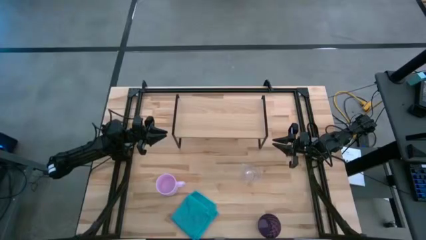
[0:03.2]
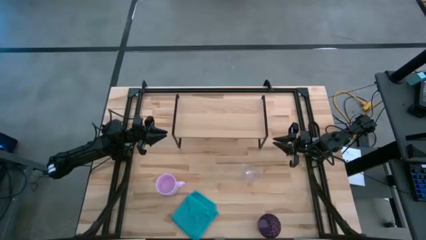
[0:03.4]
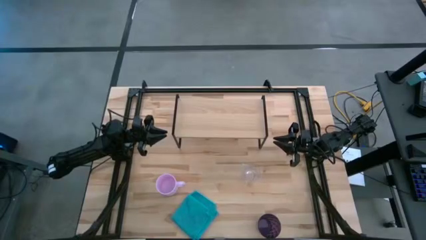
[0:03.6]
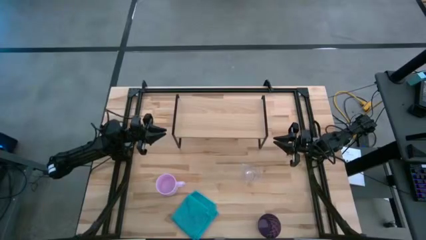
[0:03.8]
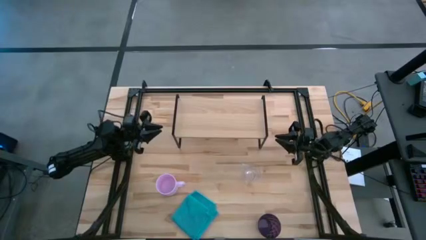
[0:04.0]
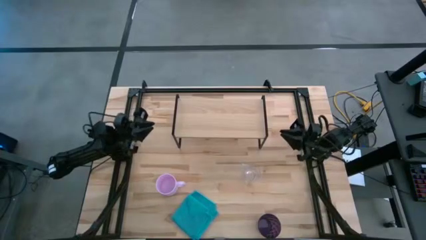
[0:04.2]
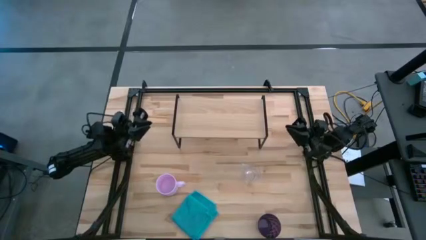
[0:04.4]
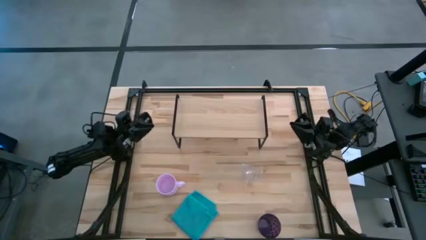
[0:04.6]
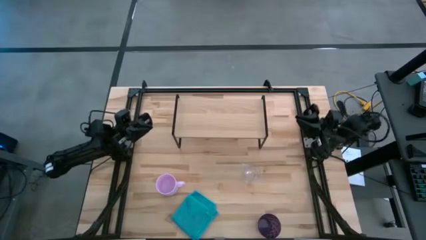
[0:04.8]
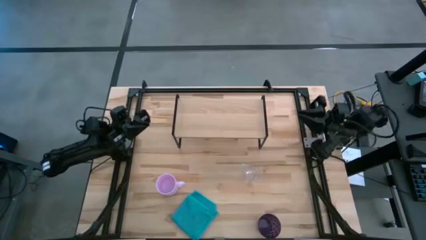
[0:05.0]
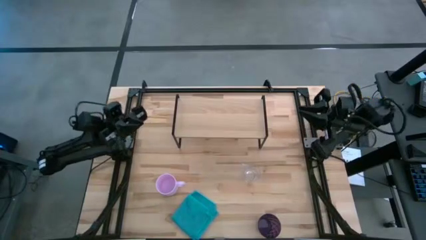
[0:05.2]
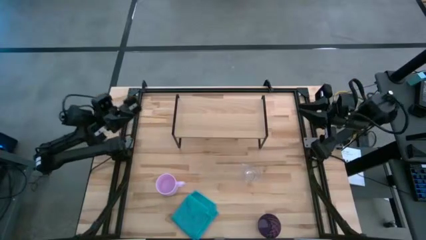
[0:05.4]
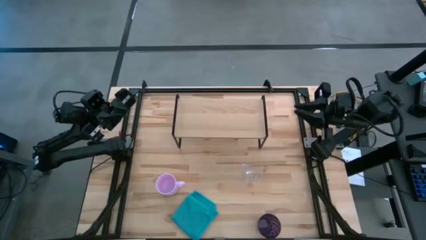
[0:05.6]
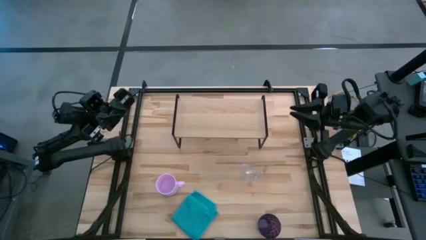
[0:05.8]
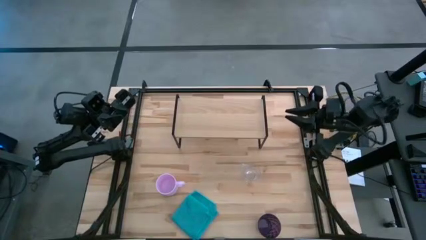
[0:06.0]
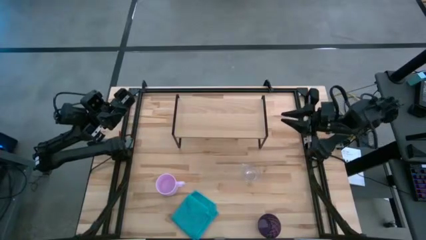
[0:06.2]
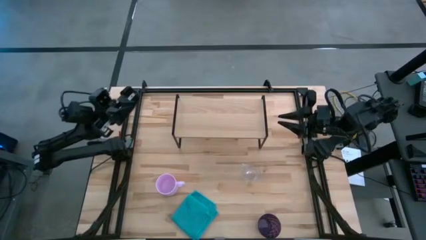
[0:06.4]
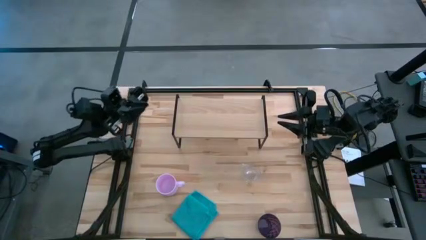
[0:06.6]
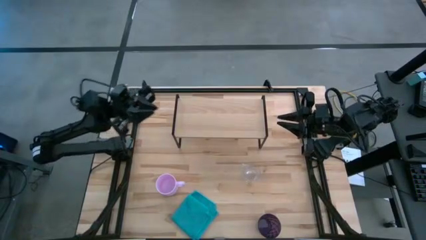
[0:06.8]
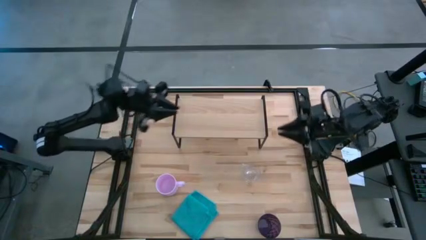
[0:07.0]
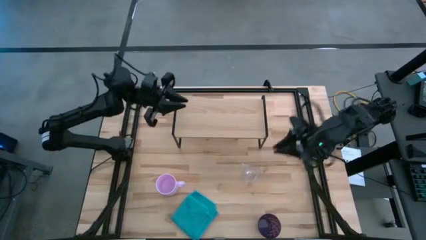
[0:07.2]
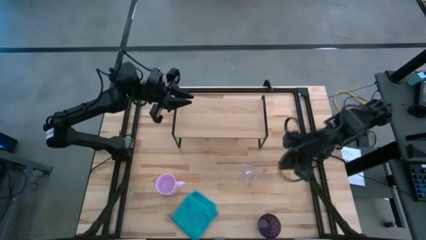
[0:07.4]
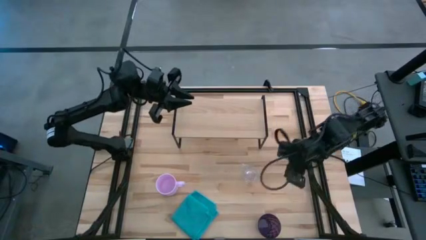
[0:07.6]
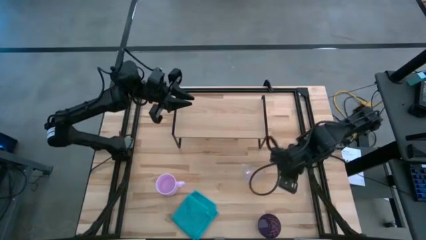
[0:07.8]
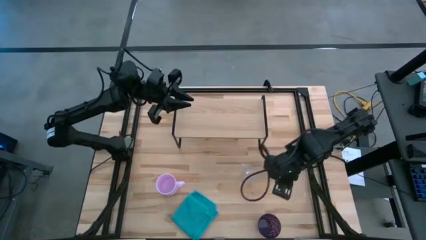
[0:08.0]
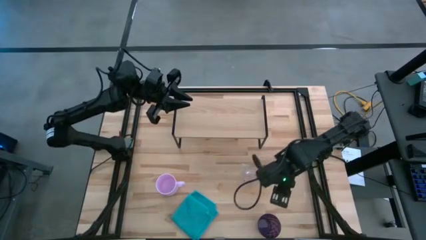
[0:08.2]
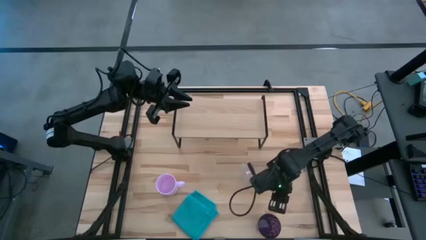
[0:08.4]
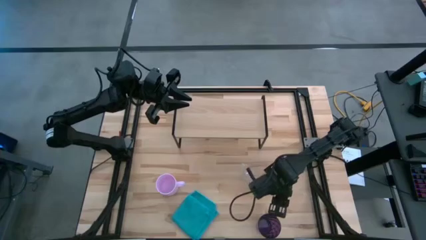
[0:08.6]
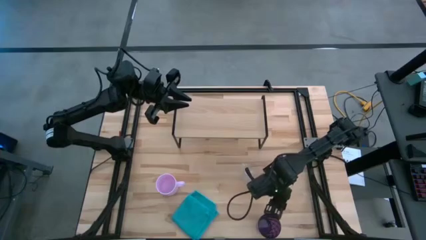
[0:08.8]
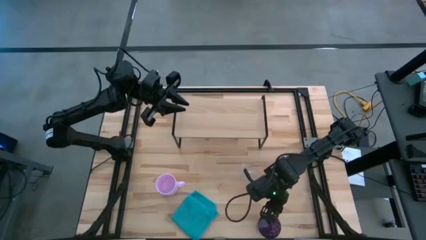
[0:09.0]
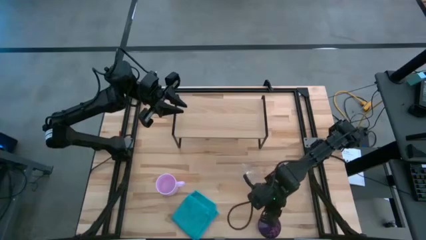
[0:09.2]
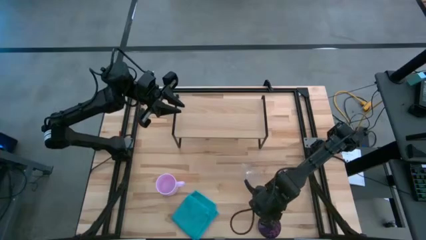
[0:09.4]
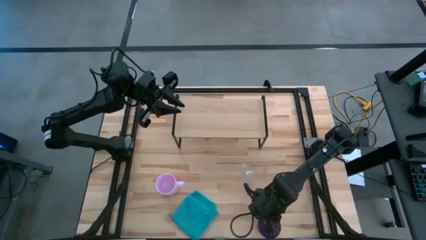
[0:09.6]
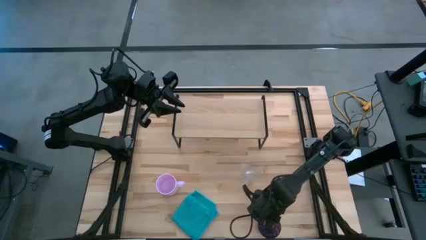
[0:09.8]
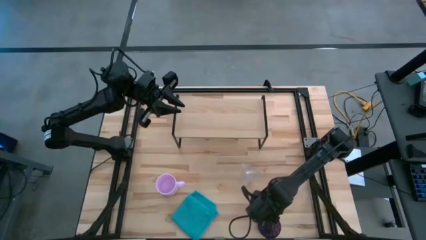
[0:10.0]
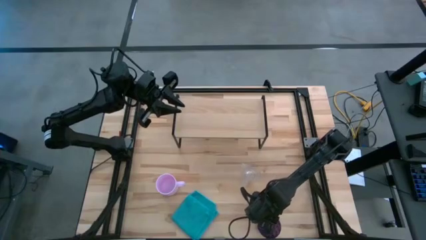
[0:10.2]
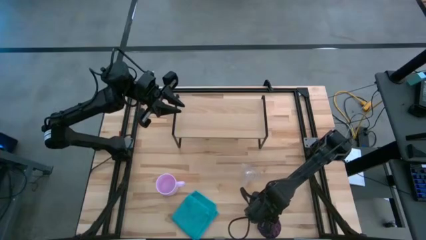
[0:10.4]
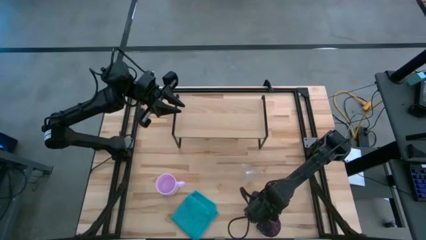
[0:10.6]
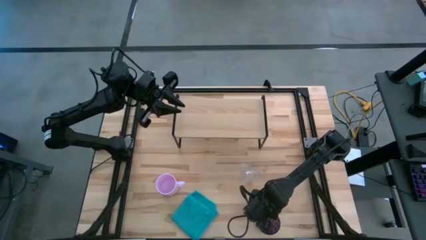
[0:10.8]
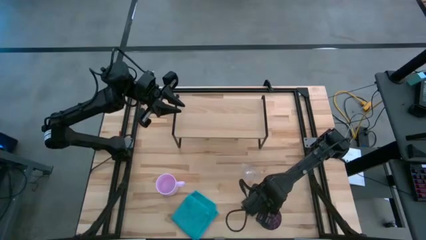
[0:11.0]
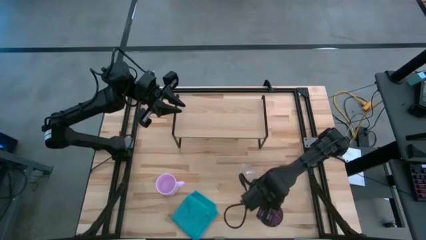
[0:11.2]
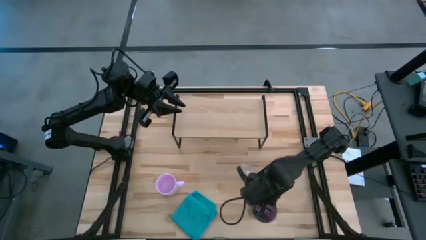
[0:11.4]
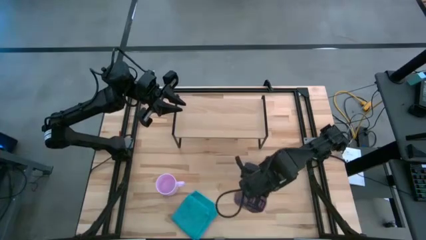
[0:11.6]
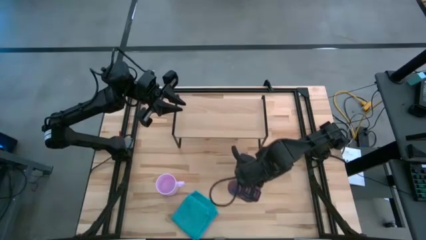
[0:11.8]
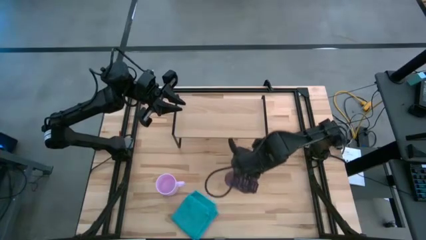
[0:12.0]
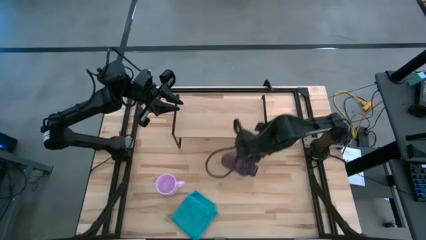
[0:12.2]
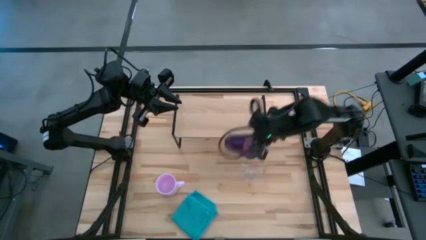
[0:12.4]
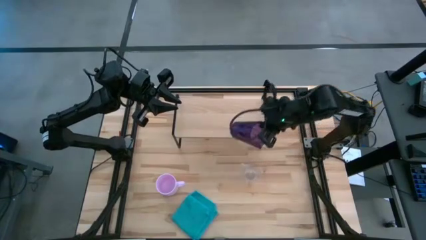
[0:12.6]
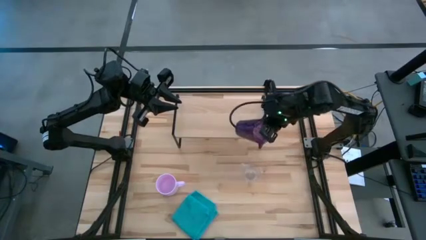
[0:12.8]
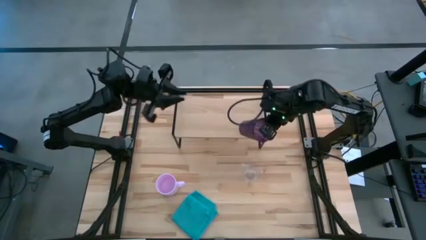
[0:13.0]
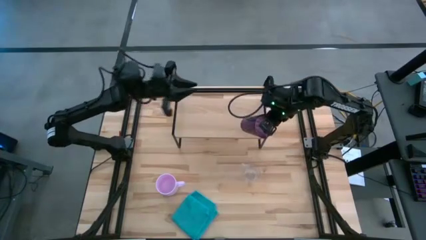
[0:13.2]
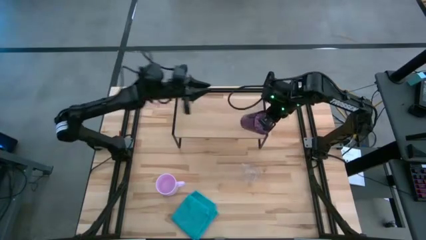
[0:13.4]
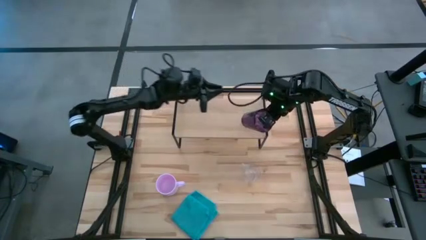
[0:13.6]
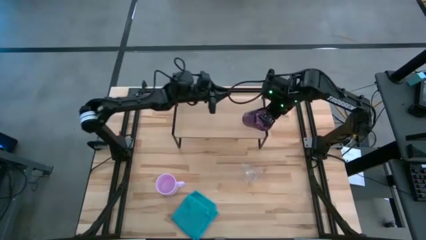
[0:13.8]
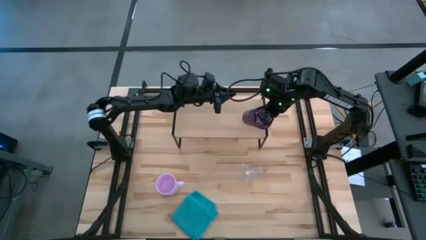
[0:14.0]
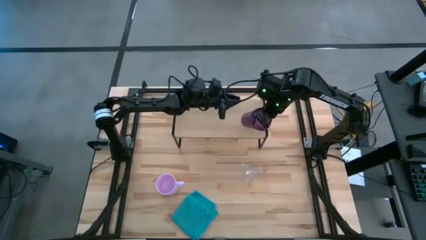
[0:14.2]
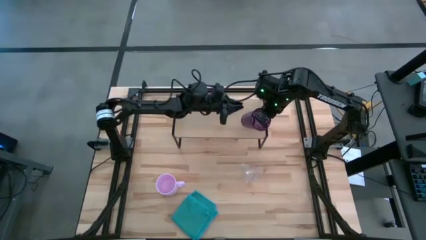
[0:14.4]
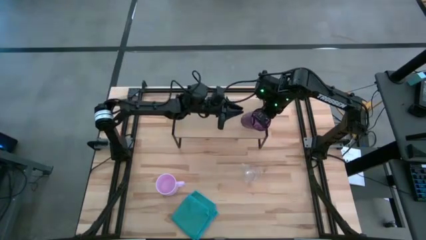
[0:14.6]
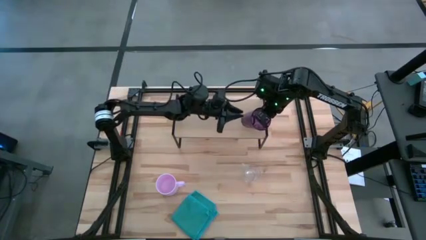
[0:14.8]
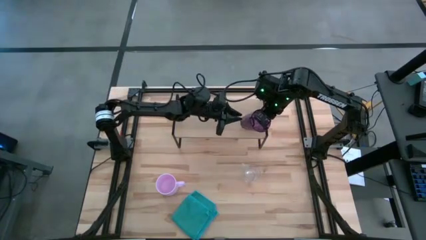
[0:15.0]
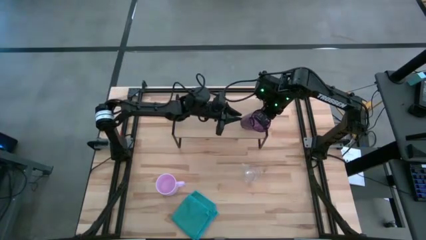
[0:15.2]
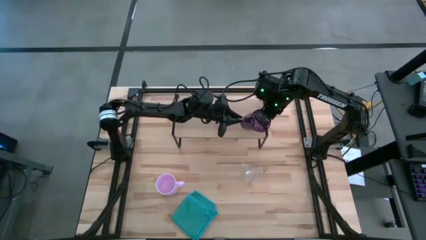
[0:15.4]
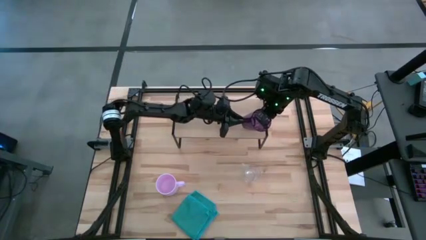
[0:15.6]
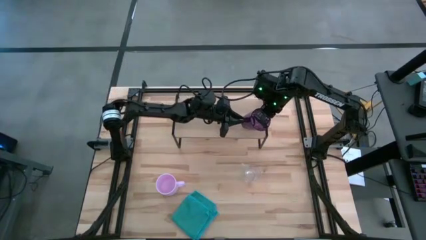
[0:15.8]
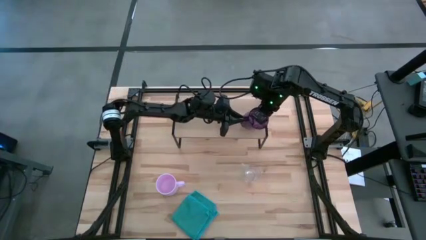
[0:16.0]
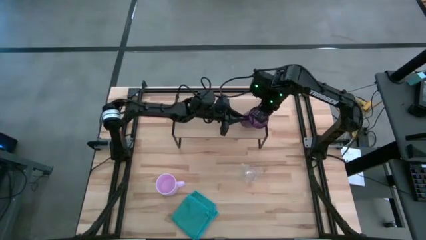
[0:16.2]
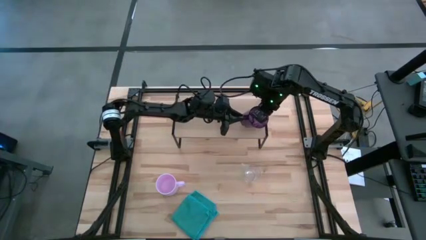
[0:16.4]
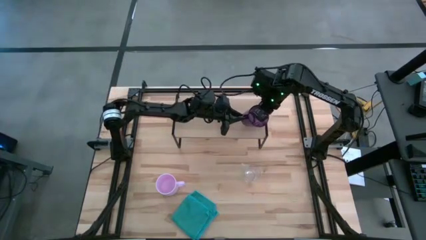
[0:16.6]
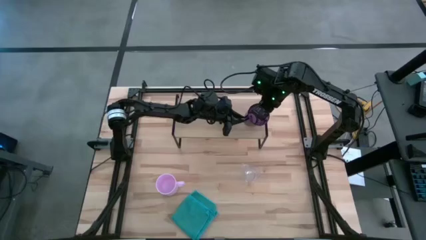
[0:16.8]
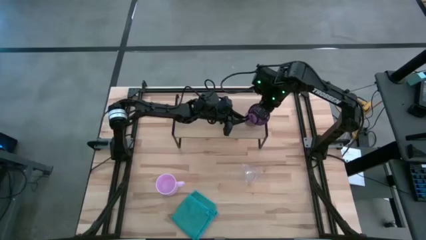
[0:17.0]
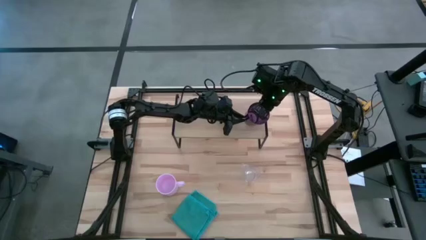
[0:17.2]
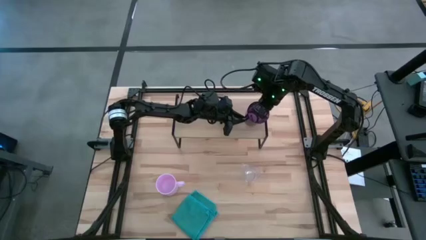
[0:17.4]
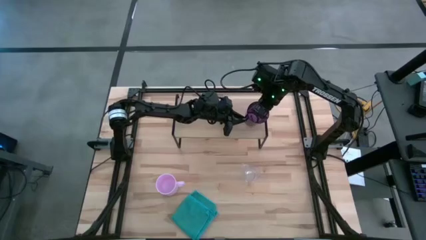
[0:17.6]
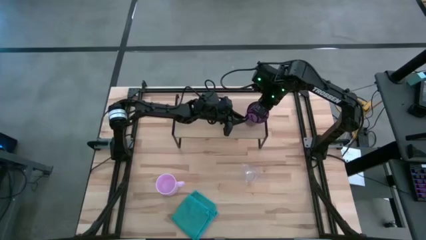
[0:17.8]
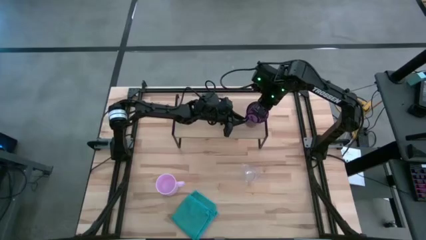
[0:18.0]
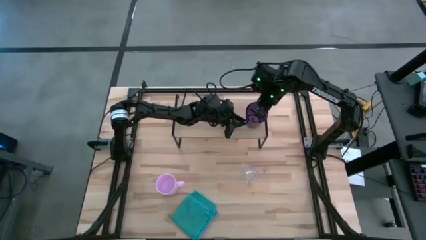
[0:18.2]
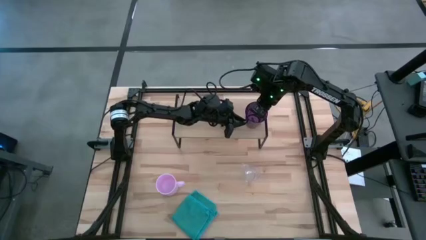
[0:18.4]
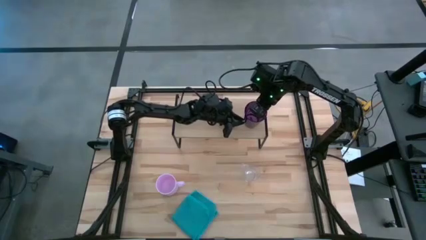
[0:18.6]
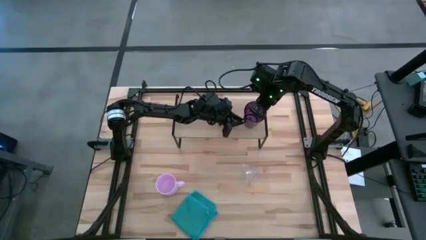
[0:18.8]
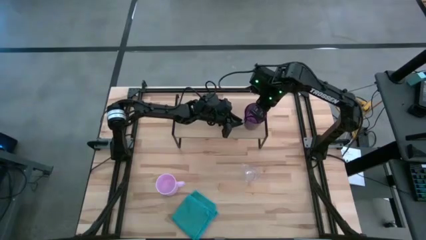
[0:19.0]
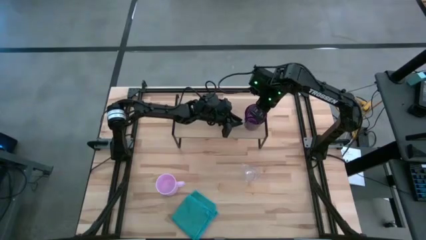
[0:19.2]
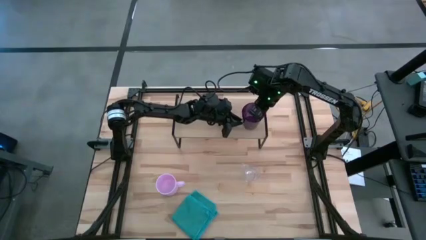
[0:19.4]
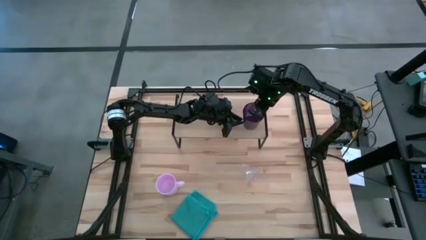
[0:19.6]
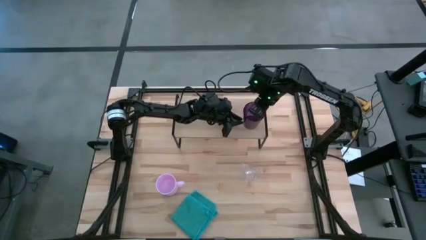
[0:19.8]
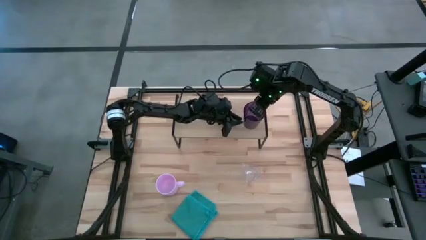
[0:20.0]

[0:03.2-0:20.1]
Task: Stack small to large cups/mugs on shelf
Put the purple cup on the shelf
